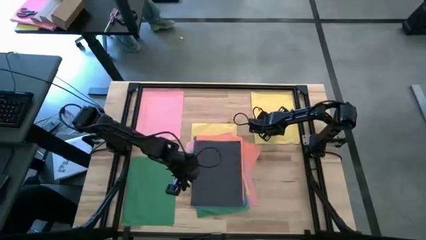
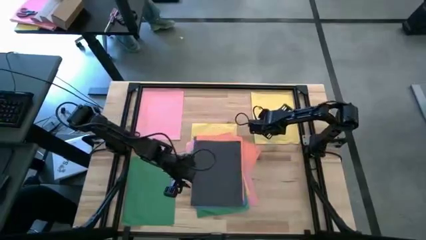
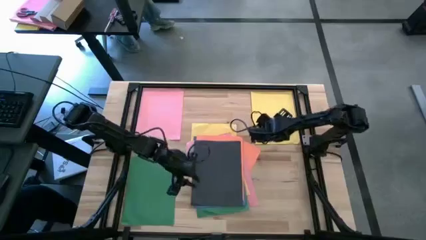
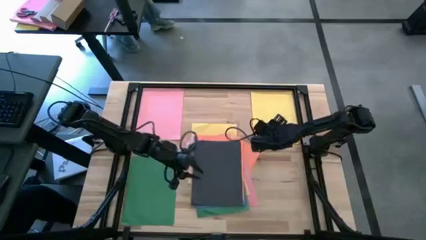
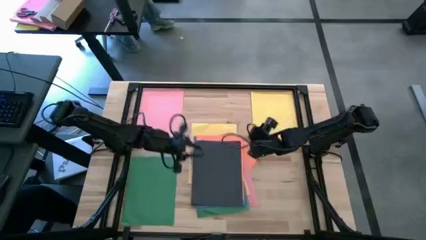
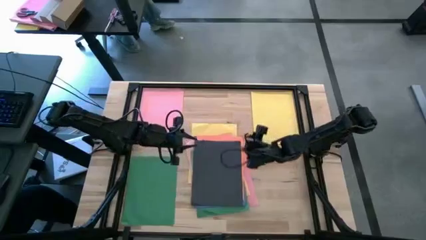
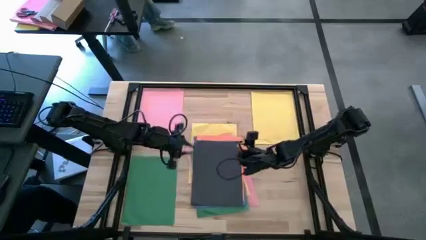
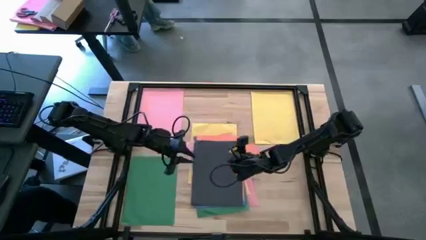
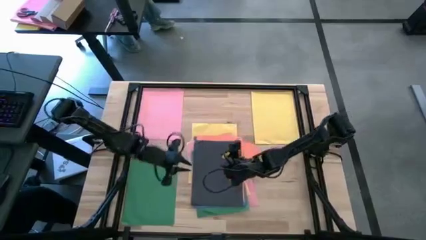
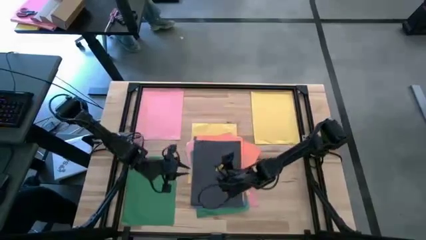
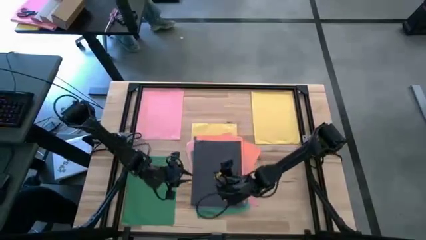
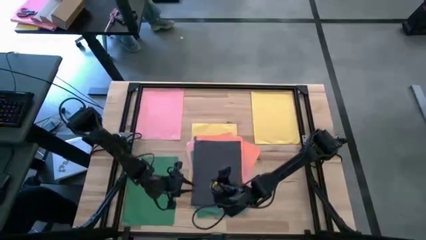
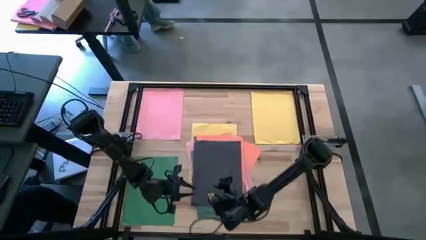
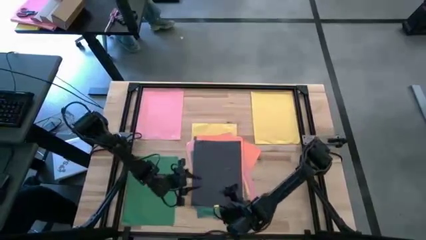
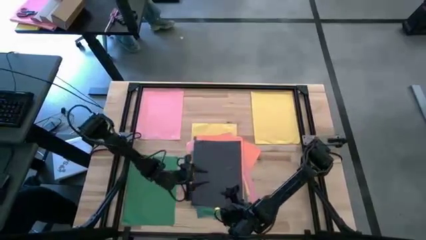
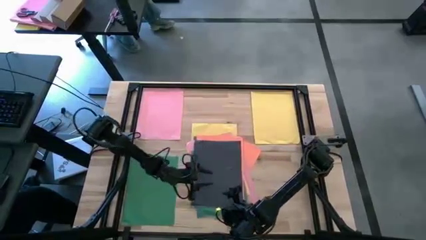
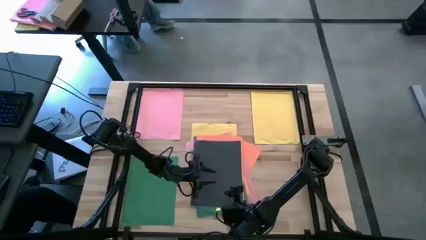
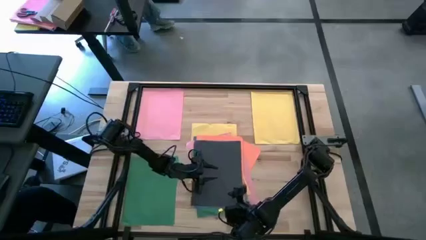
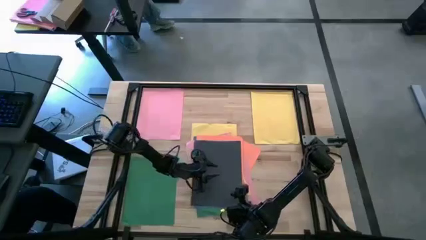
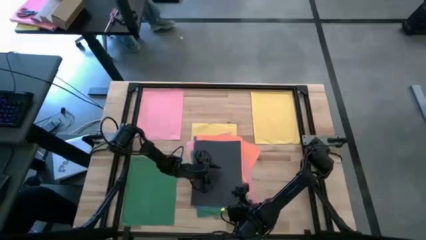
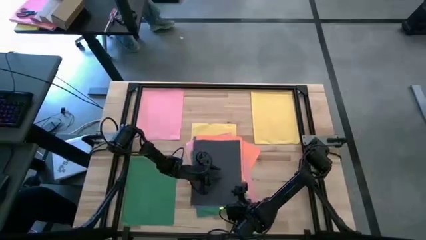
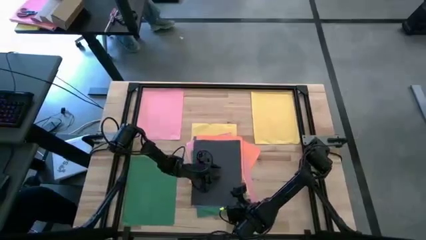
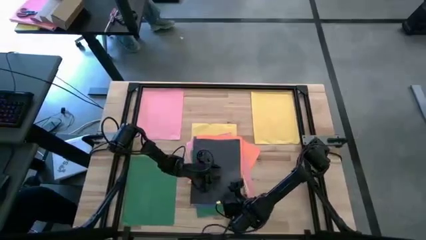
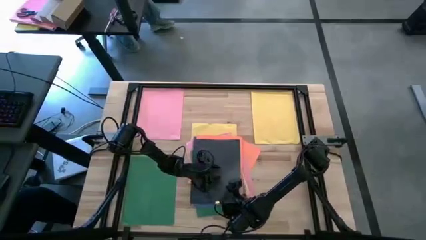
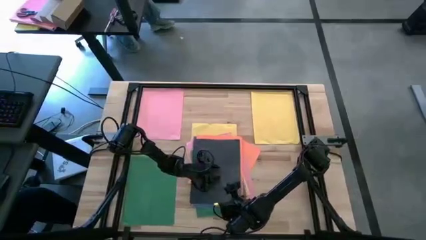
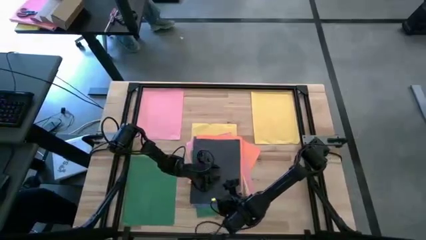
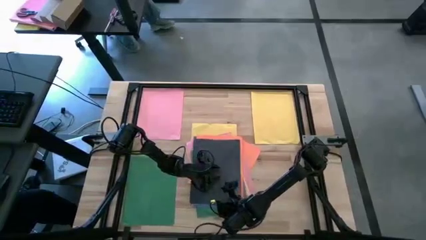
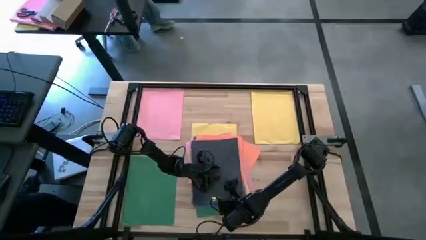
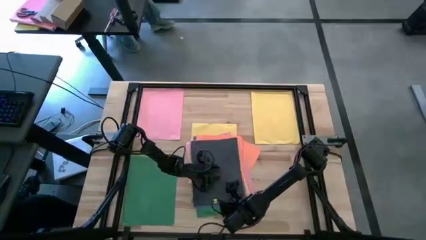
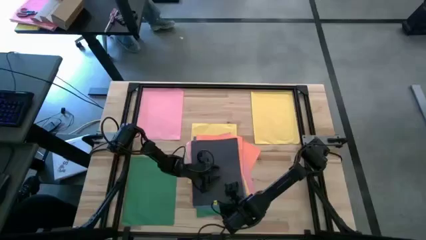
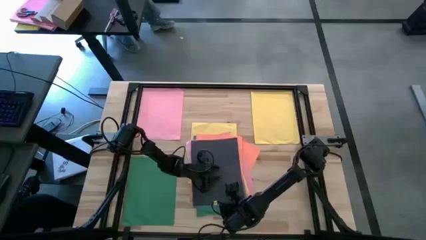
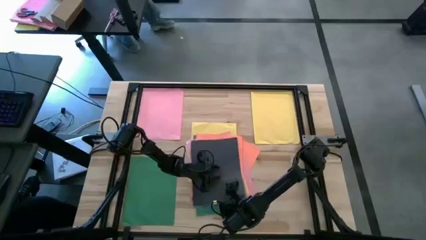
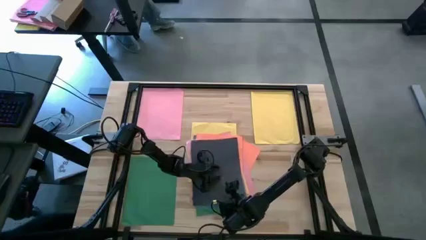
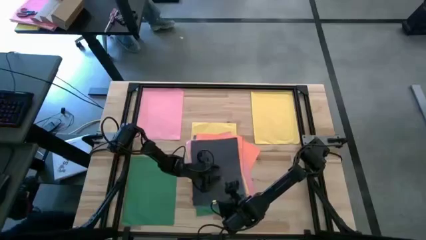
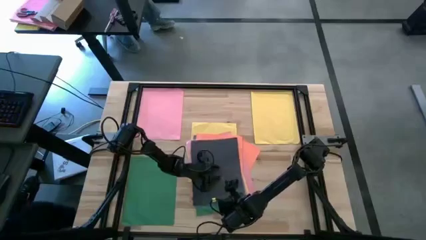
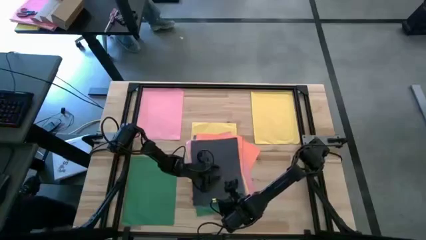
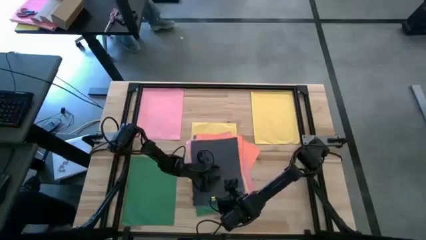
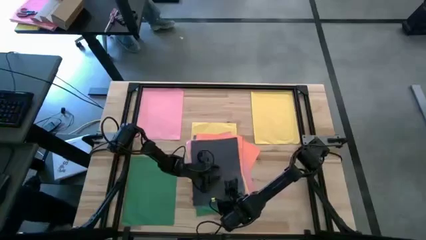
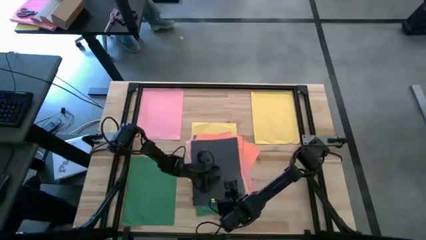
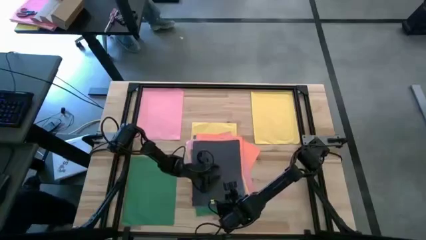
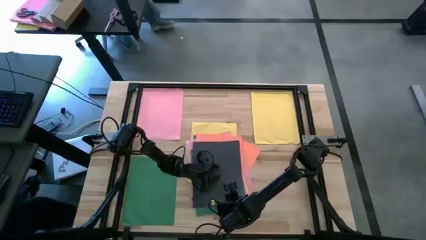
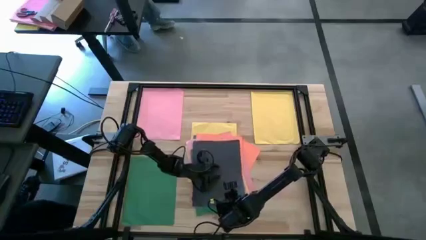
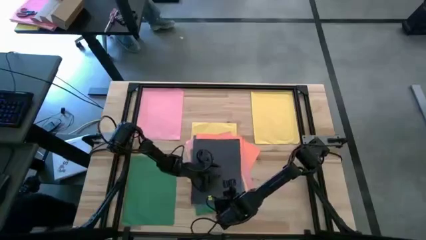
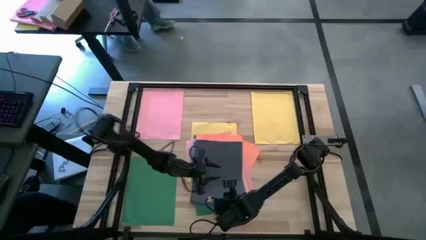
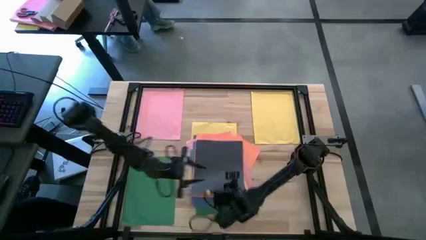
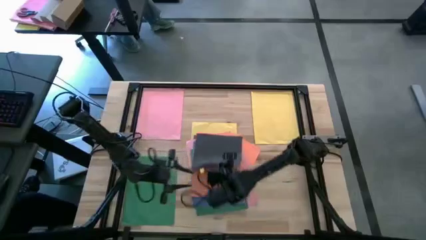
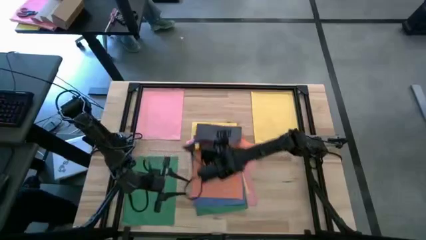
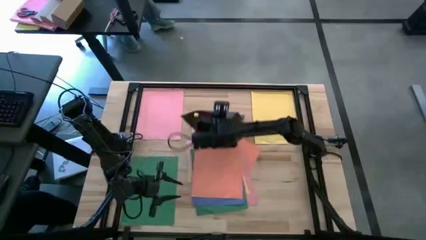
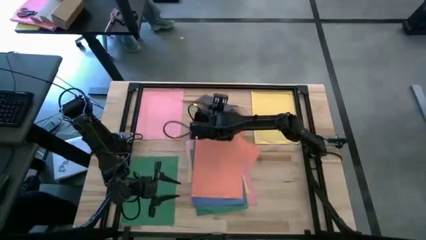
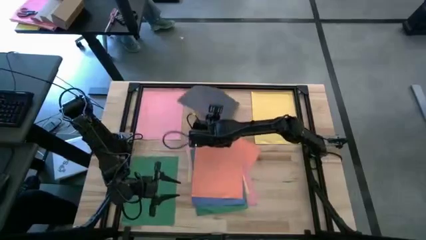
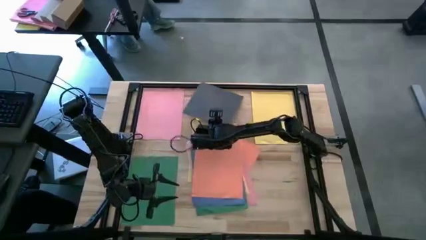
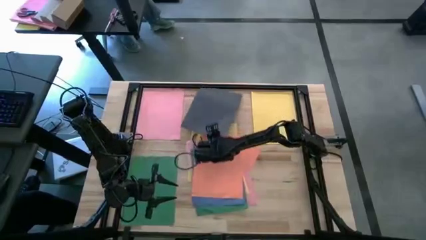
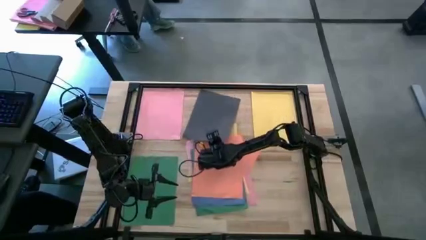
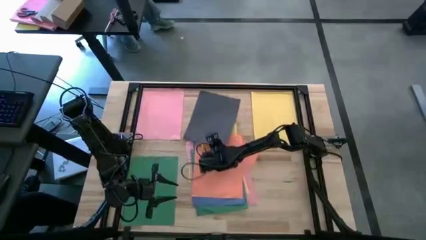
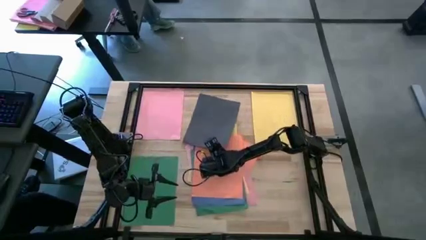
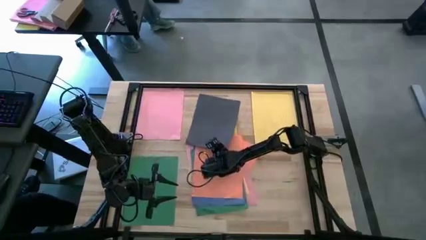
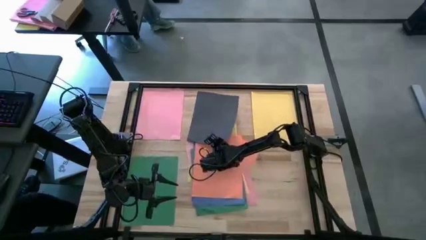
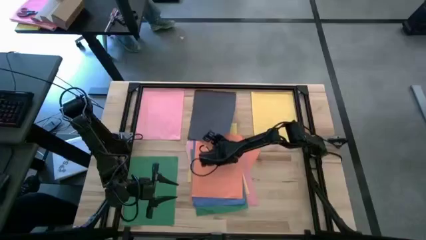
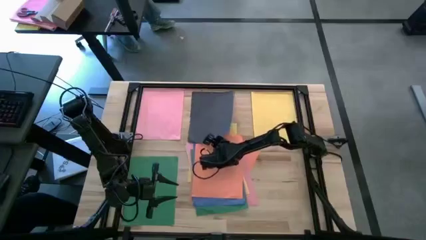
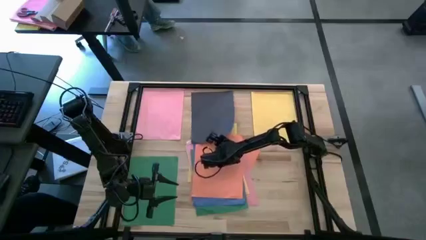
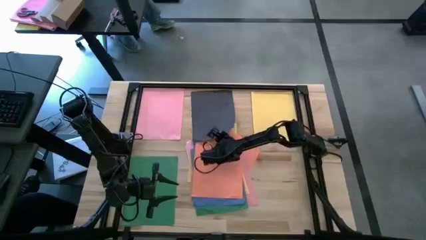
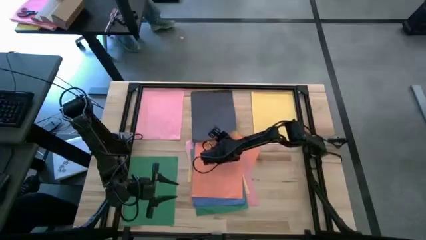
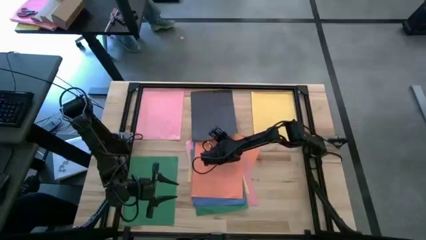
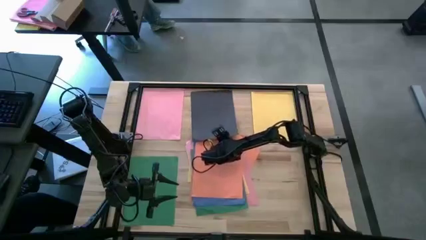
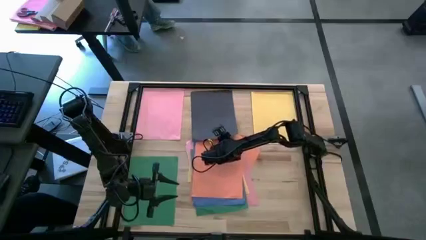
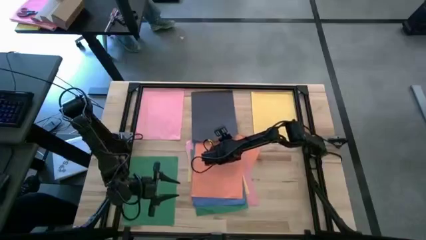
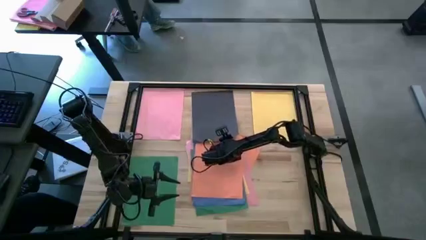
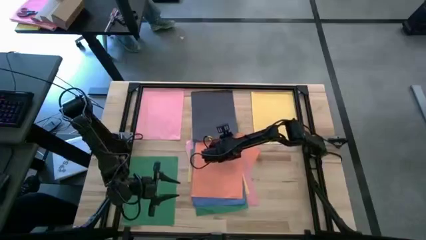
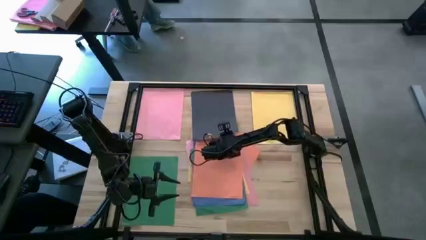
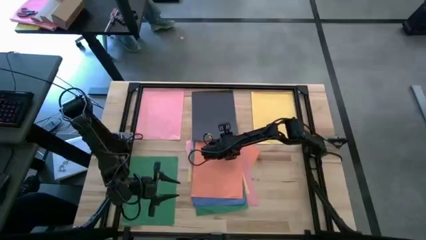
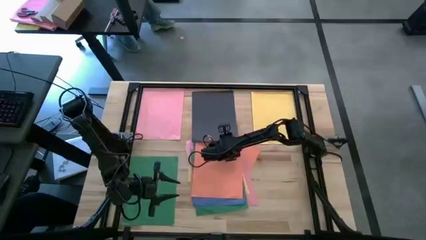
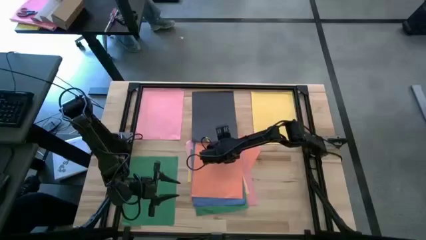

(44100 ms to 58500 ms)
Task: Organize paper
Move the black color paper to the top center of the table
